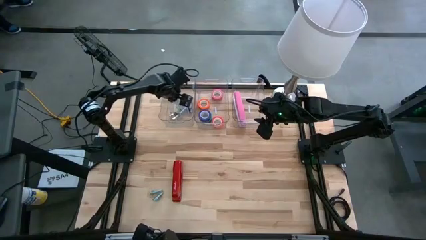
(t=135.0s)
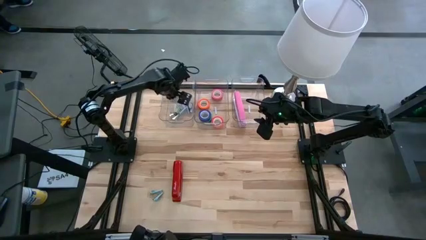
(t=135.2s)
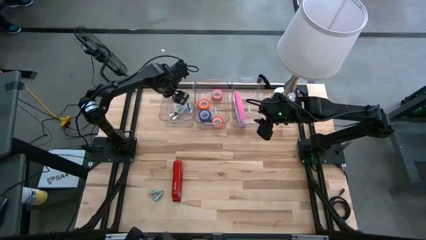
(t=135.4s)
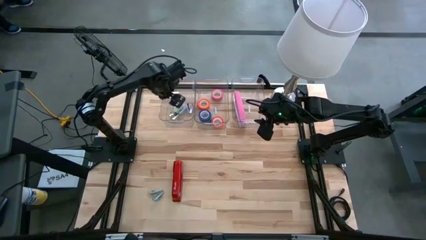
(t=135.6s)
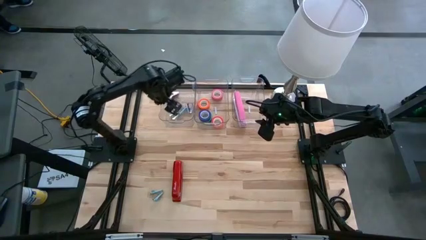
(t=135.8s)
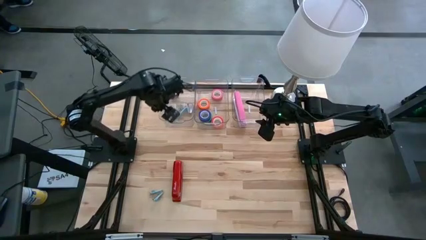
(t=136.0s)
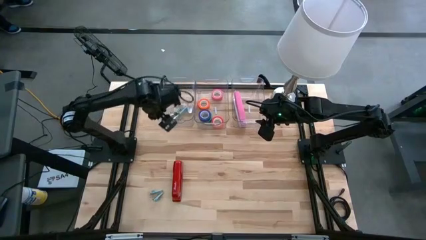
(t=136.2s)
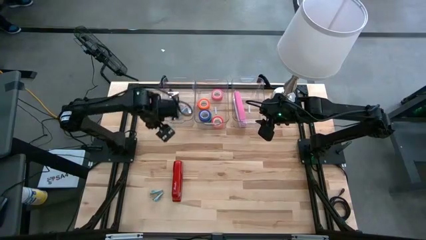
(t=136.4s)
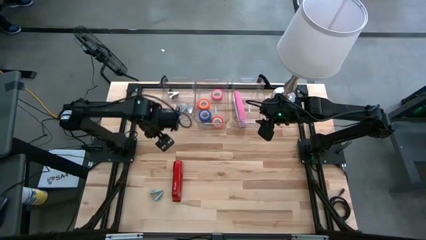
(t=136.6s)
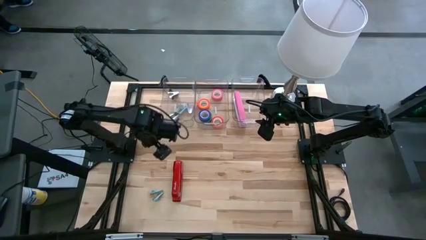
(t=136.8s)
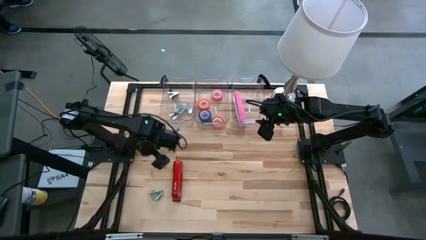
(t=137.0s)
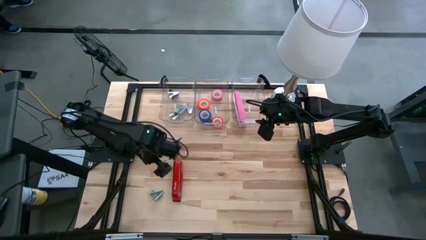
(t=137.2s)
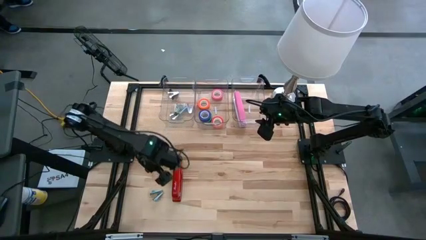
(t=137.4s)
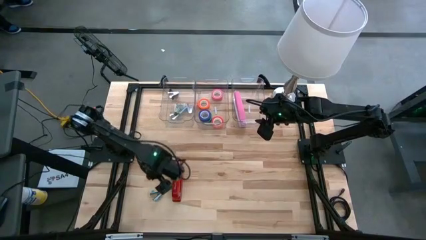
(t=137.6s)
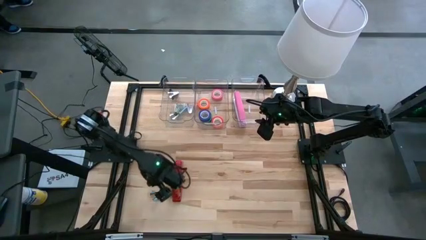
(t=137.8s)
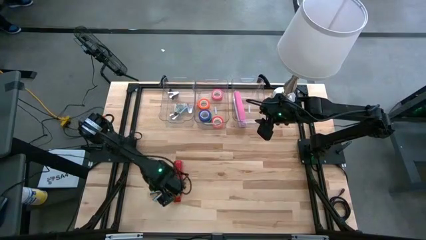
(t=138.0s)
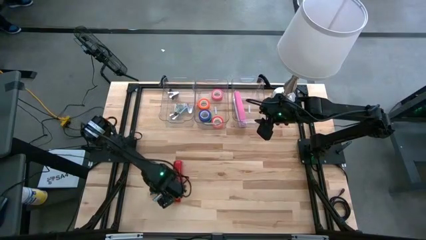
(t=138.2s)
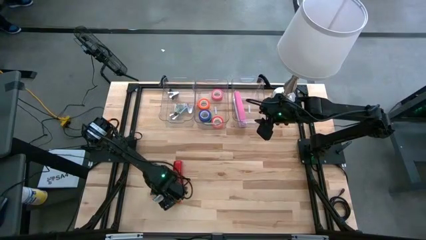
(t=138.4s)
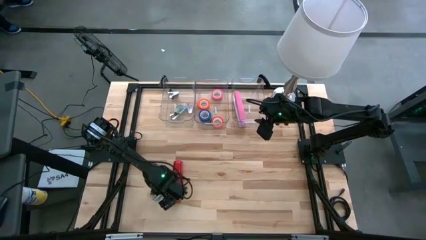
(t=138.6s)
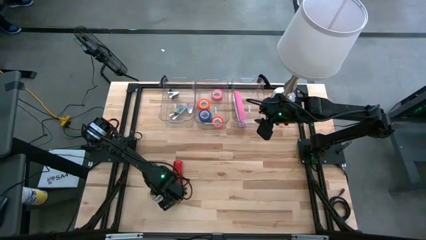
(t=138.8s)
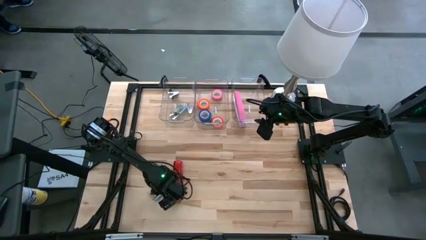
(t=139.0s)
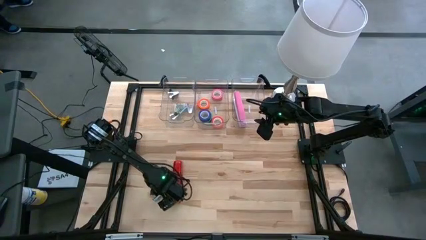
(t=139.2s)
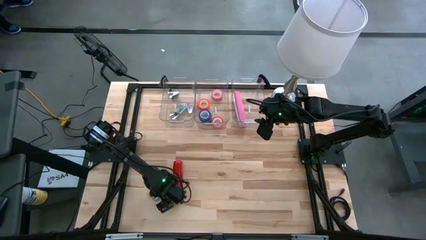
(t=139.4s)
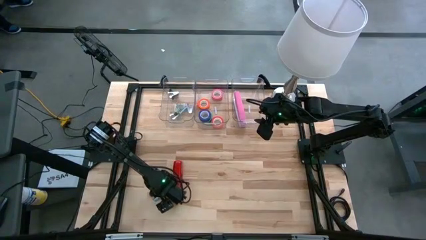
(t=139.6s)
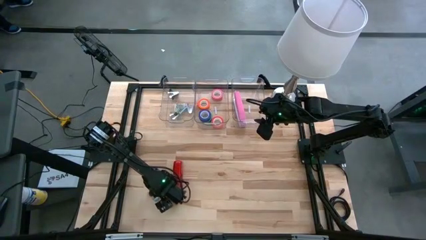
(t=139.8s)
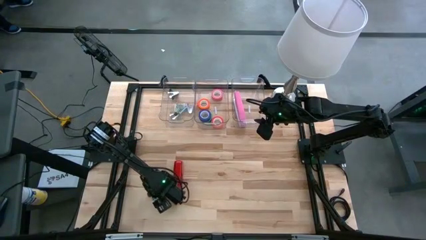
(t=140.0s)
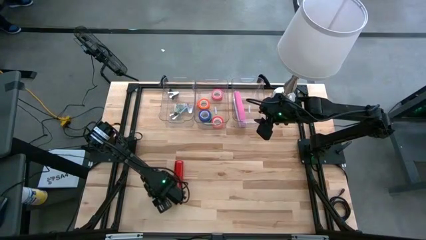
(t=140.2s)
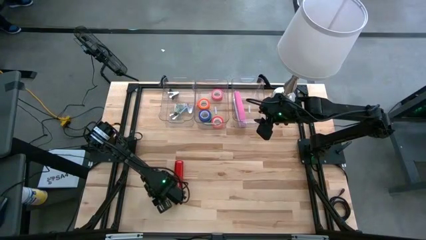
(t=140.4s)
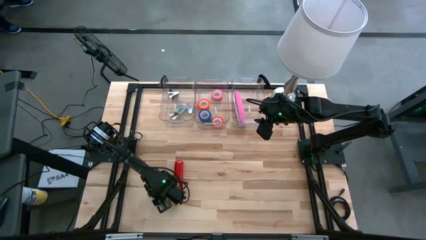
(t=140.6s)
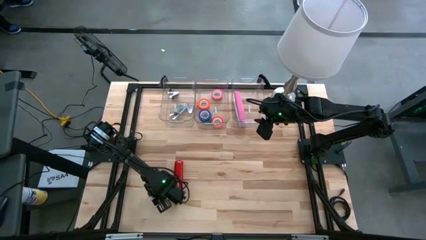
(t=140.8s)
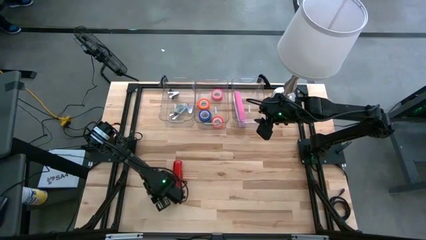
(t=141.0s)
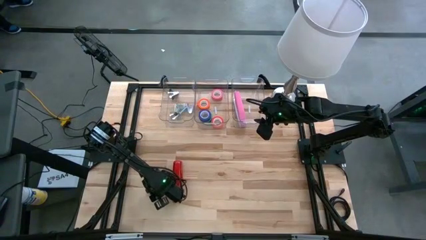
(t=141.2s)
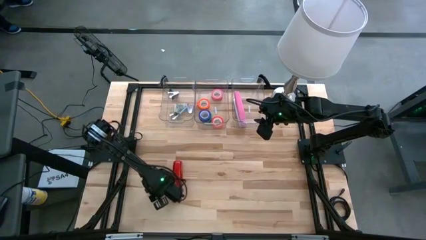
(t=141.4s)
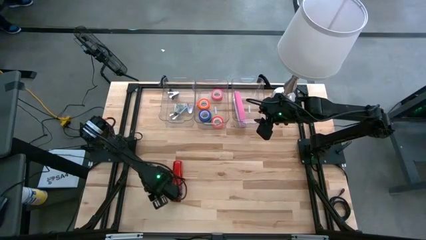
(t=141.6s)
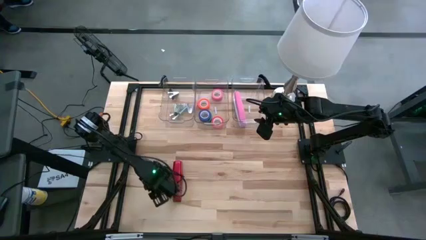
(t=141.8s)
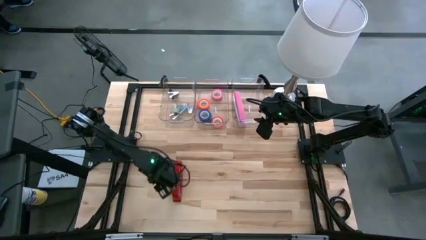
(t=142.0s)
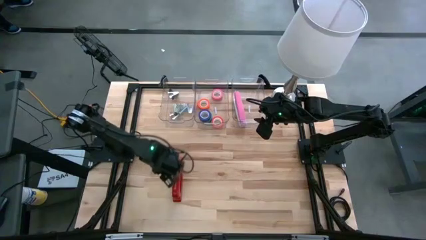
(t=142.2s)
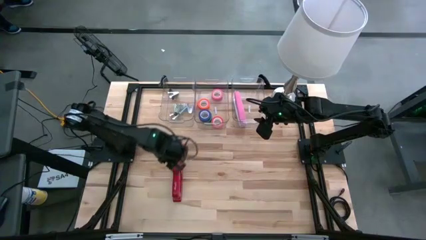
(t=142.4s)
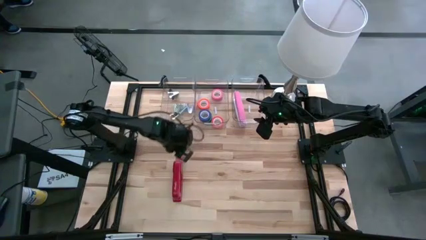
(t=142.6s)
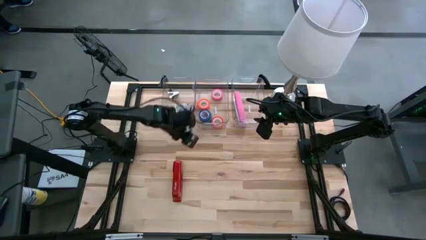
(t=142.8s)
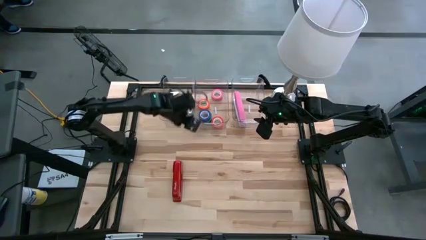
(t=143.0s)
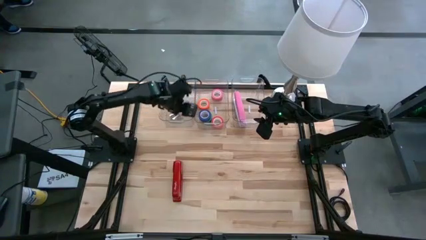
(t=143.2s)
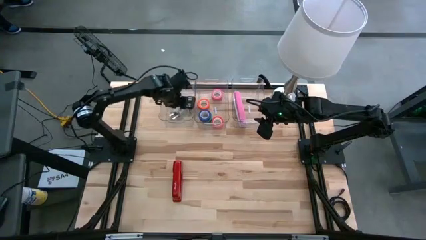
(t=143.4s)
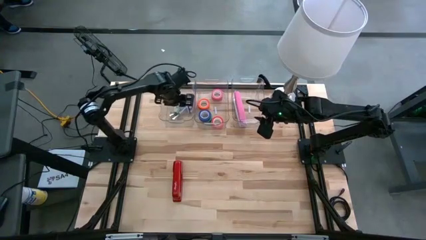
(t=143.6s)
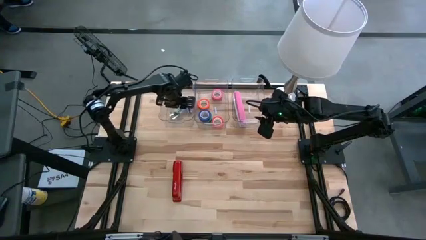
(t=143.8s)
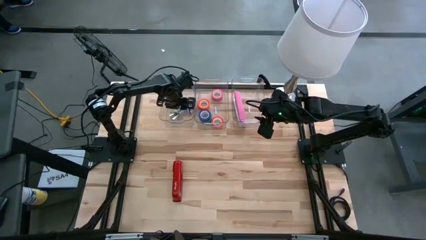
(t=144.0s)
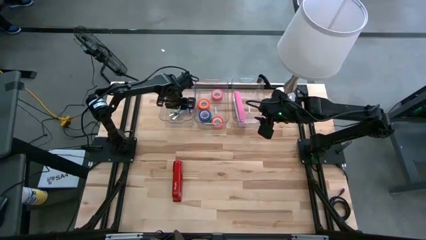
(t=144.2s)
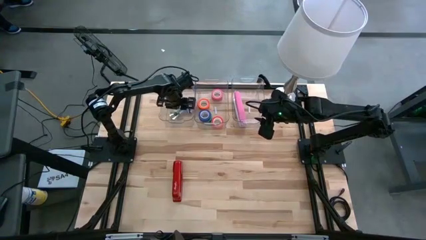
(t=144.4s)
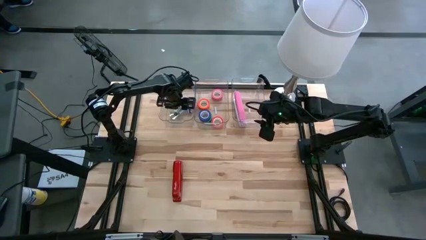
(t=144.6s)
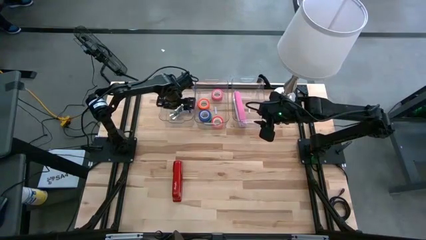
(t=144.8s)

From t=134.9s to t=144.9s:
Task: Pick and place Stapler, Stapler remover, tape
Put the blue staple remover into the left transparent bin

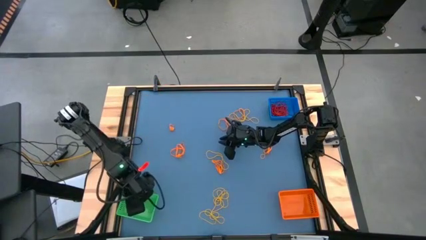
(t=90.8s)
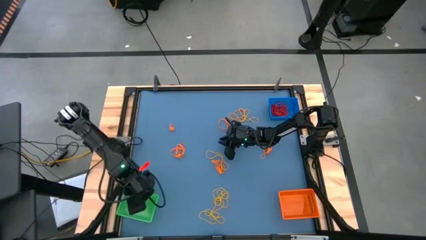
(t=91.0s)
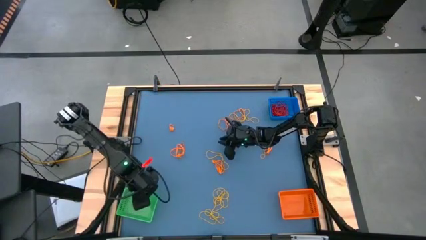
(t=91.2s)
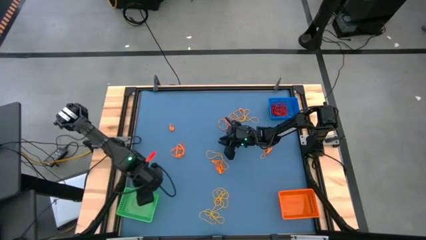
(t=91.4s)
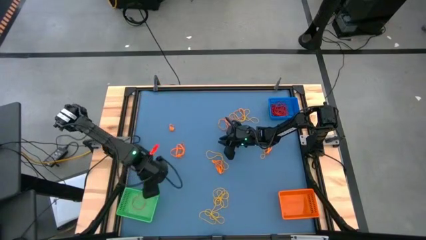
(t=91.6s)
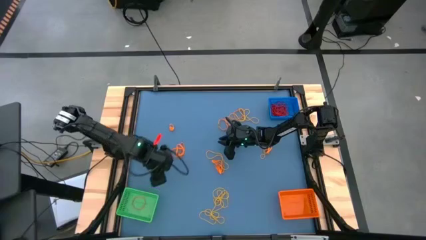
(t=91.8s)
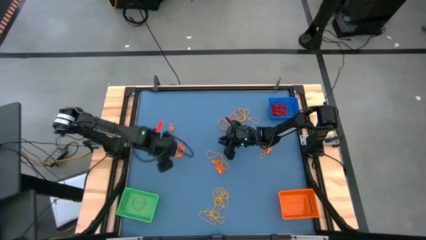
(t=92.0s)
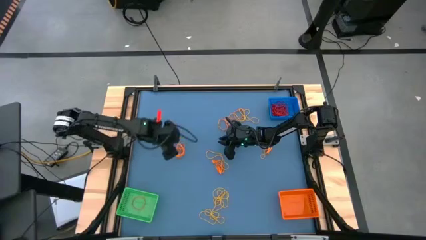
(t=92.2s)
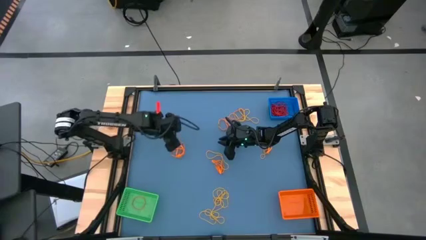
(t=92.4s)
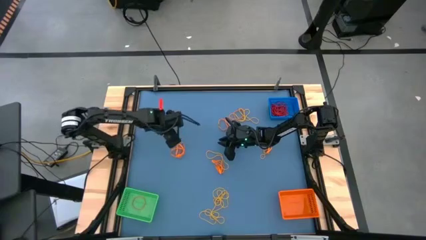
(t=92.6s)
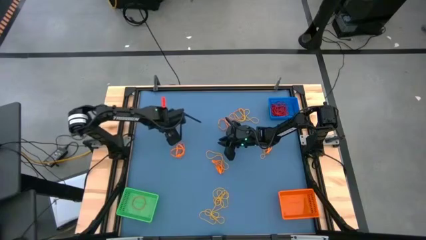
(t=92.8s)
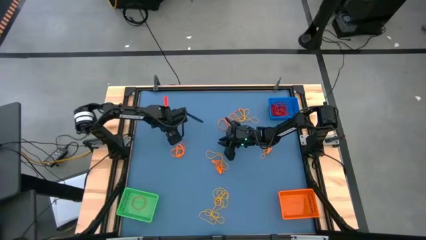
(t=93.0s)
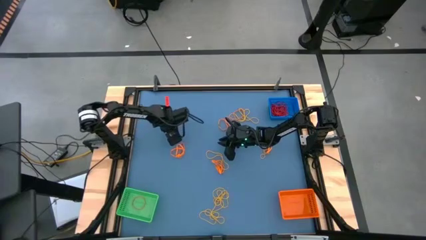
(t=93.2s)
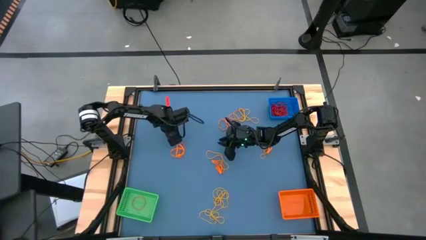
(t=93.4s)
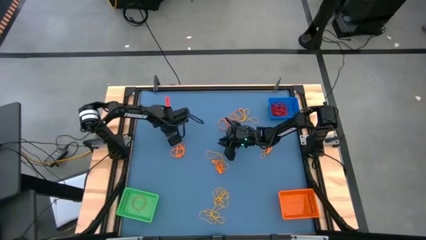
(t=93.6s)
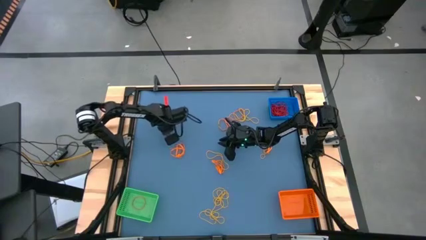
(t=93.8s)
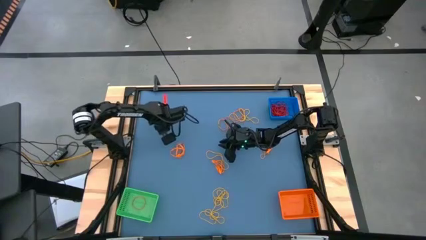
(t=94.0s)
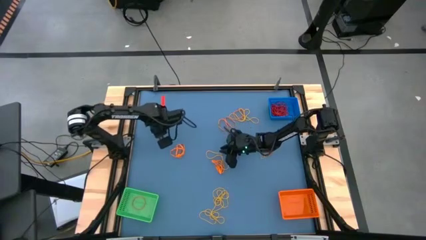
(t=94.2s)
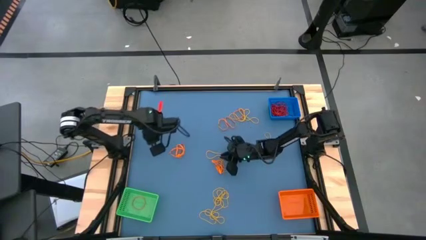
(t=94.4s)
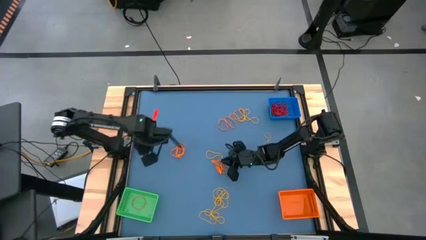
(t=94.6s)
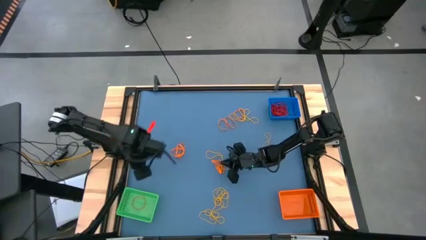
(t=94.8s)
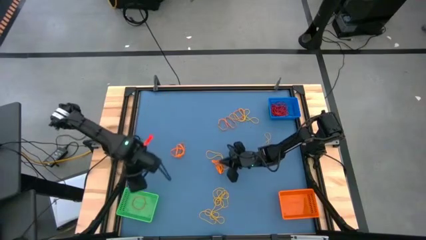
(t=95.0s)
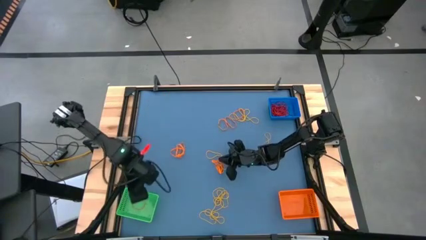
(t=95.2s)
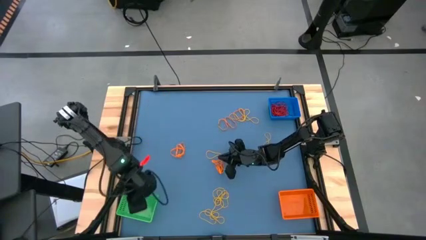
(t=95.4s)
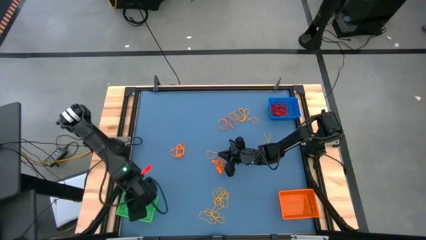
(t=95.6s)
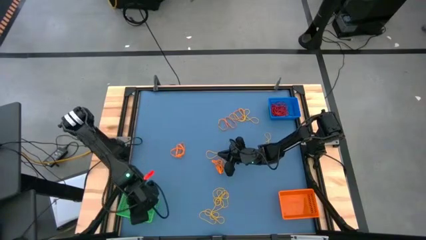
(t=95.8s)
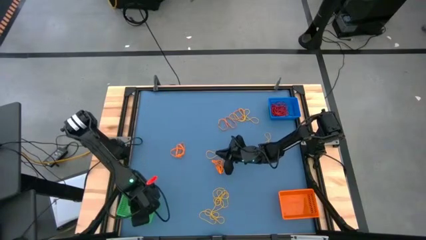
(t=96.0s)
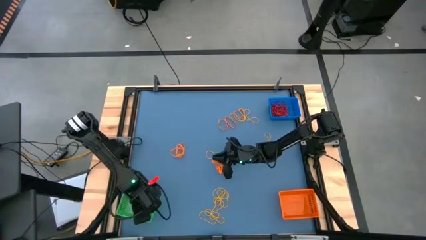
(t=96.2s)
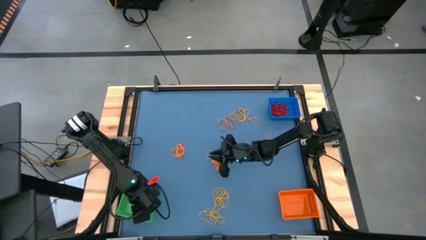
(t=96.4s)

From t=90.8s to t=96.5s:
Task: Sort rubber bands into baskets
Put the orange rubber band into the green bin
